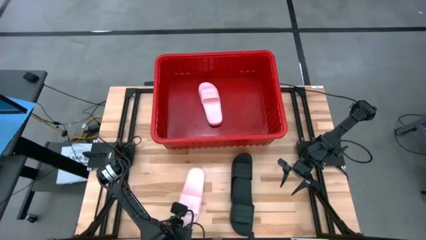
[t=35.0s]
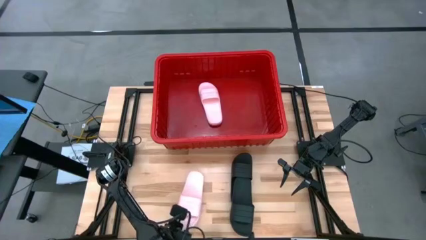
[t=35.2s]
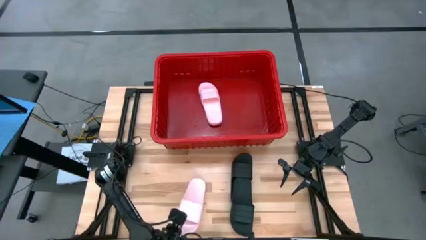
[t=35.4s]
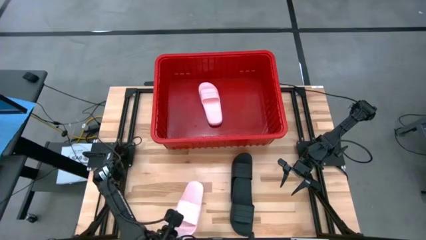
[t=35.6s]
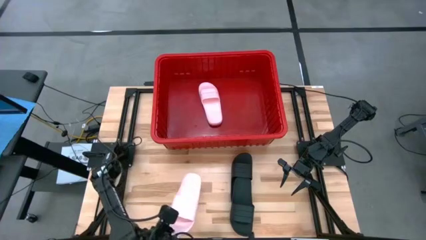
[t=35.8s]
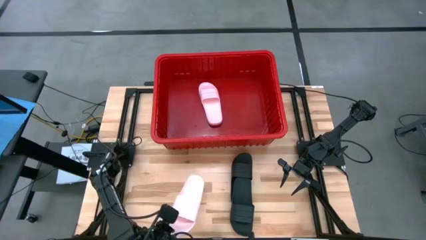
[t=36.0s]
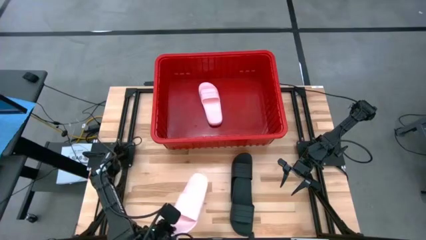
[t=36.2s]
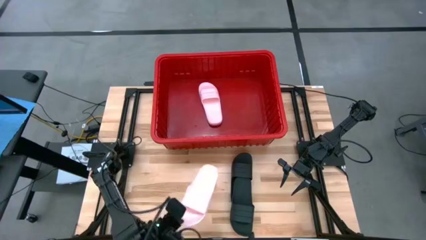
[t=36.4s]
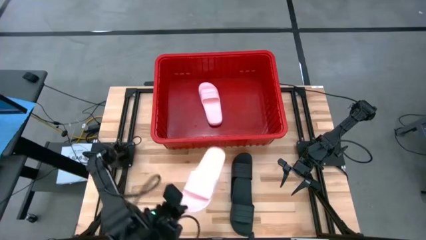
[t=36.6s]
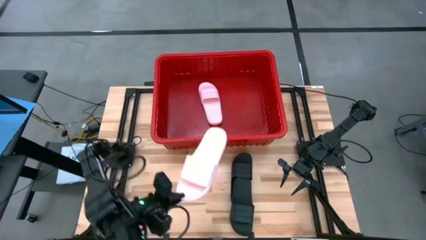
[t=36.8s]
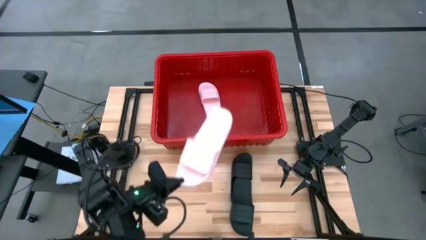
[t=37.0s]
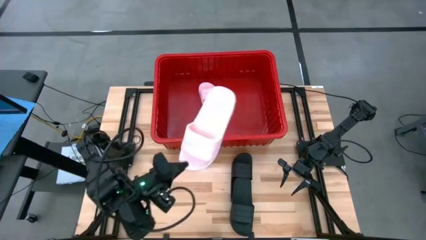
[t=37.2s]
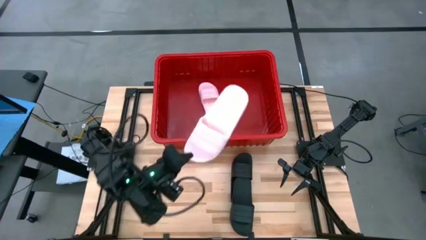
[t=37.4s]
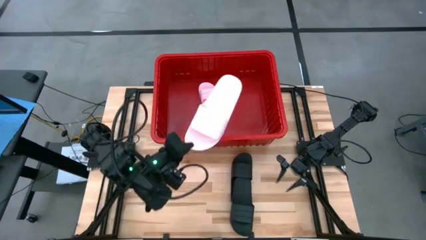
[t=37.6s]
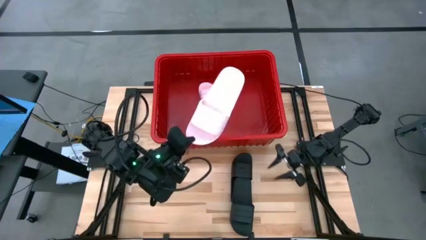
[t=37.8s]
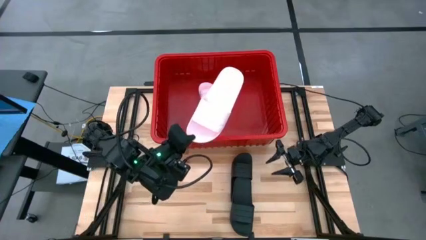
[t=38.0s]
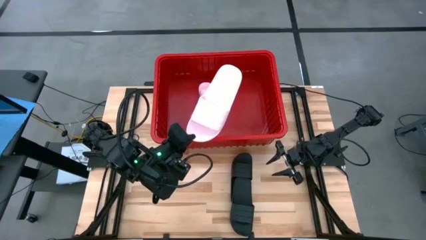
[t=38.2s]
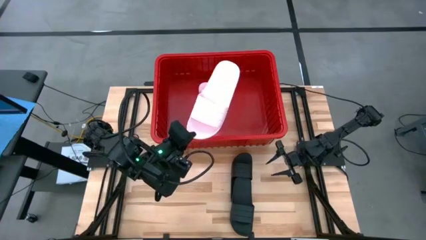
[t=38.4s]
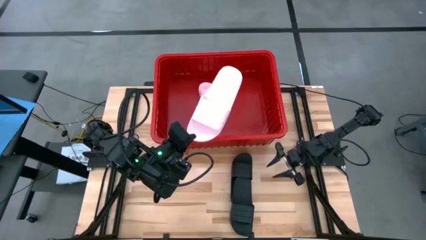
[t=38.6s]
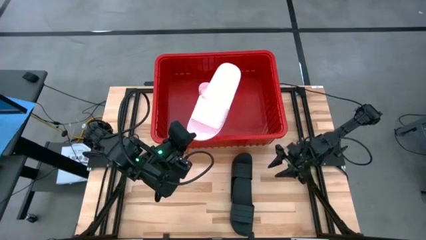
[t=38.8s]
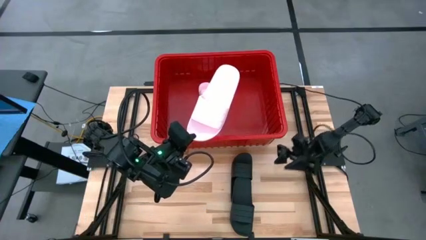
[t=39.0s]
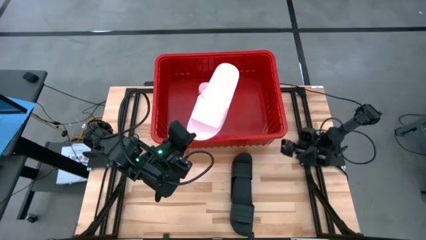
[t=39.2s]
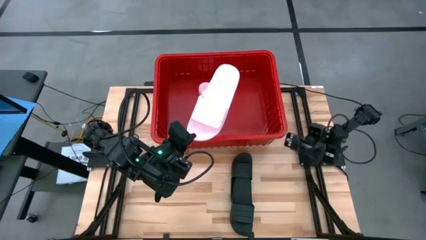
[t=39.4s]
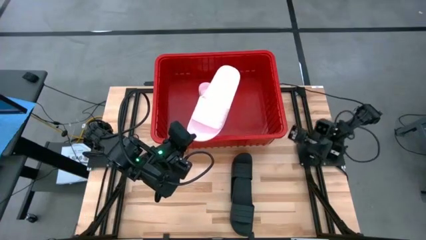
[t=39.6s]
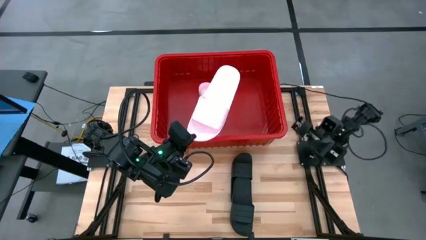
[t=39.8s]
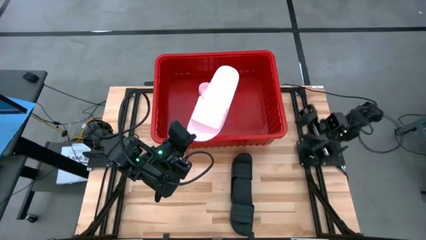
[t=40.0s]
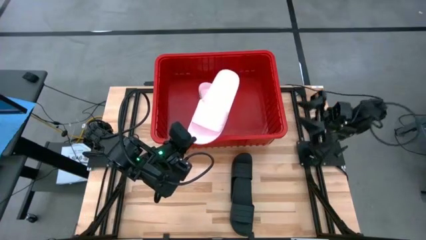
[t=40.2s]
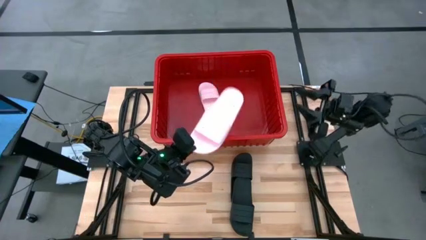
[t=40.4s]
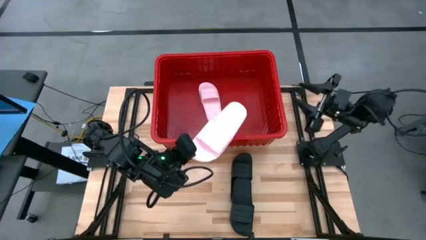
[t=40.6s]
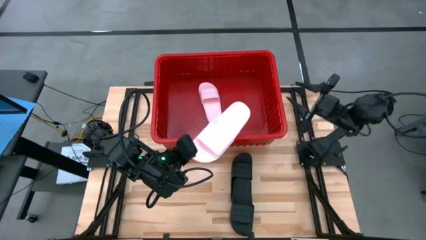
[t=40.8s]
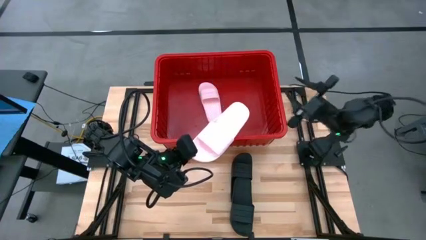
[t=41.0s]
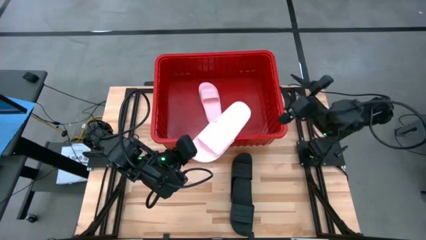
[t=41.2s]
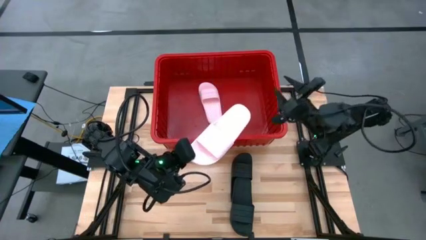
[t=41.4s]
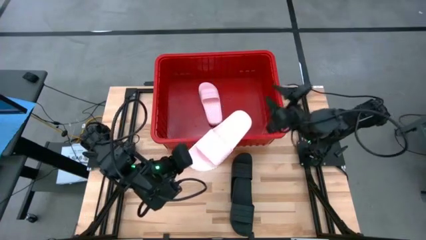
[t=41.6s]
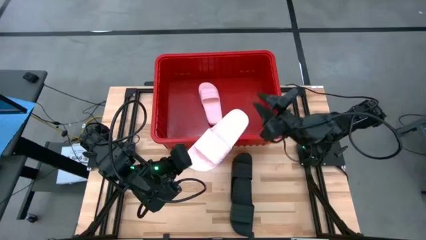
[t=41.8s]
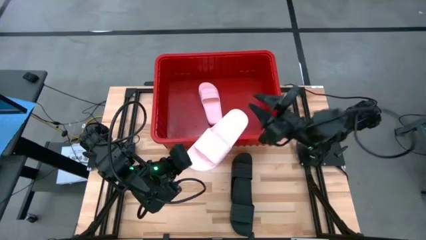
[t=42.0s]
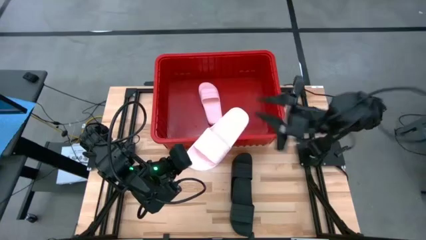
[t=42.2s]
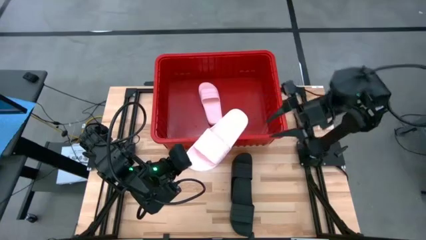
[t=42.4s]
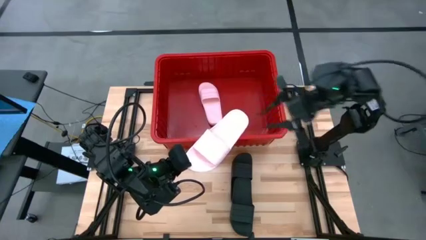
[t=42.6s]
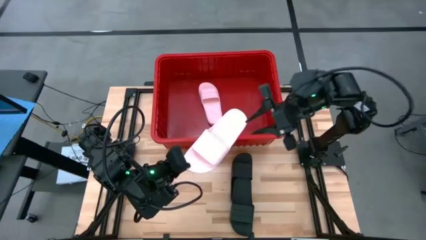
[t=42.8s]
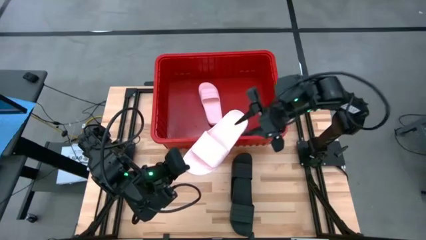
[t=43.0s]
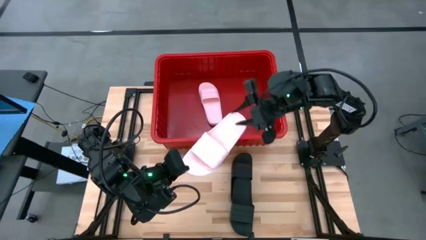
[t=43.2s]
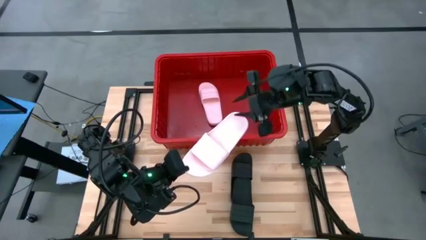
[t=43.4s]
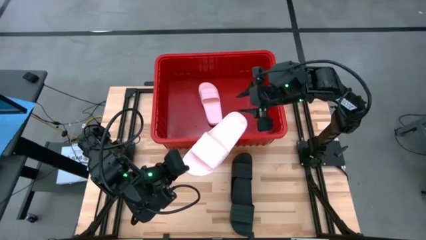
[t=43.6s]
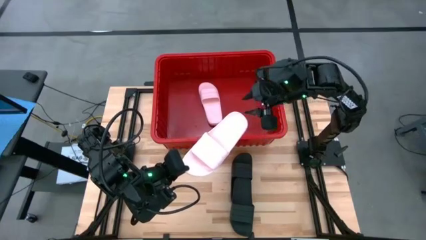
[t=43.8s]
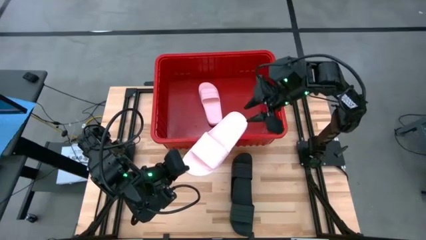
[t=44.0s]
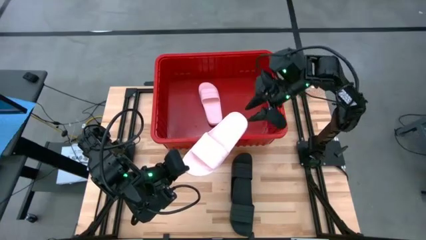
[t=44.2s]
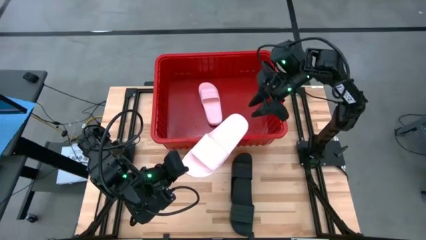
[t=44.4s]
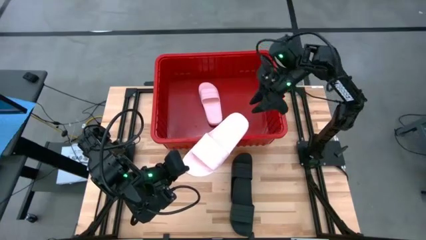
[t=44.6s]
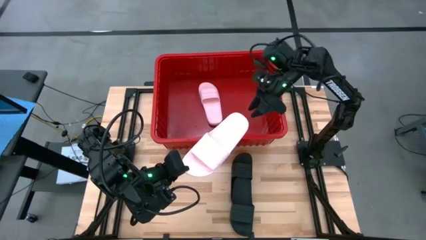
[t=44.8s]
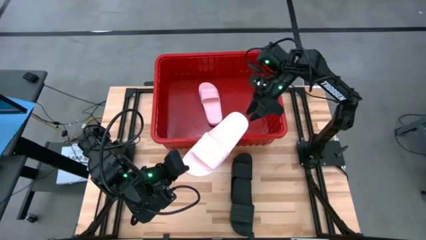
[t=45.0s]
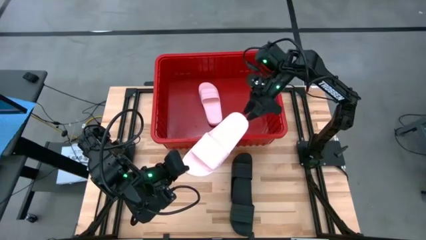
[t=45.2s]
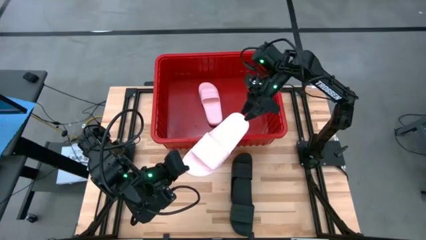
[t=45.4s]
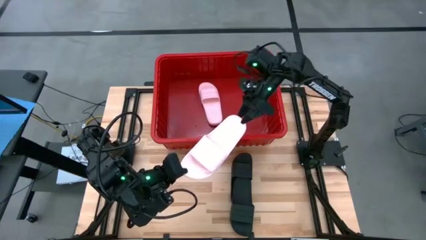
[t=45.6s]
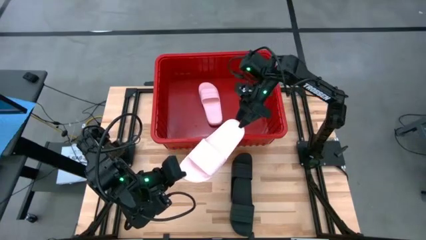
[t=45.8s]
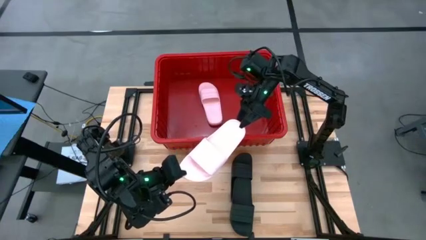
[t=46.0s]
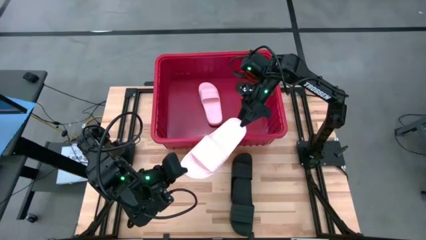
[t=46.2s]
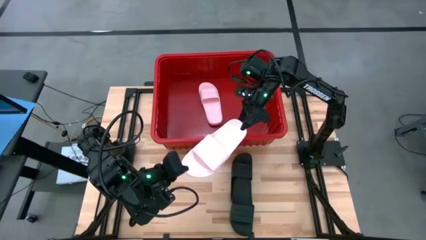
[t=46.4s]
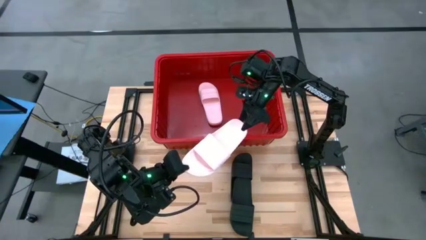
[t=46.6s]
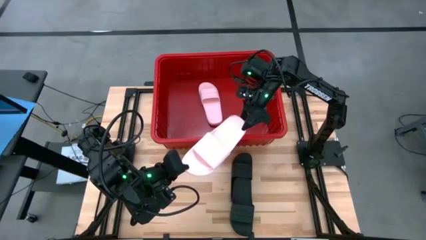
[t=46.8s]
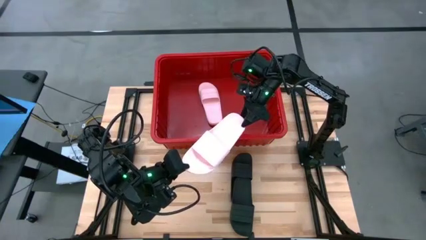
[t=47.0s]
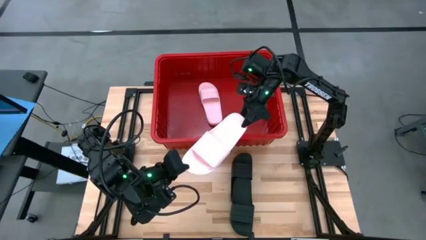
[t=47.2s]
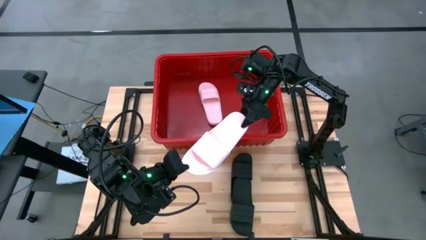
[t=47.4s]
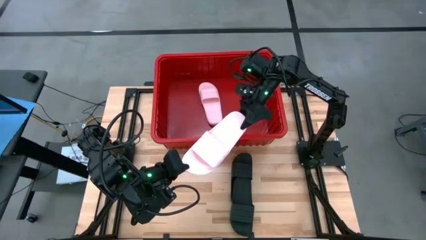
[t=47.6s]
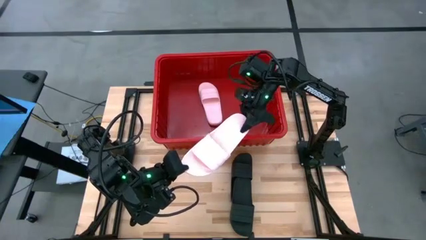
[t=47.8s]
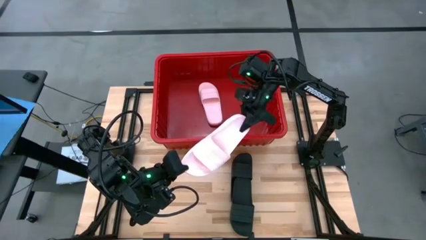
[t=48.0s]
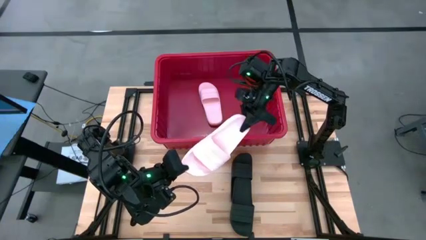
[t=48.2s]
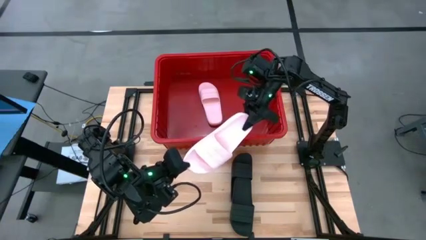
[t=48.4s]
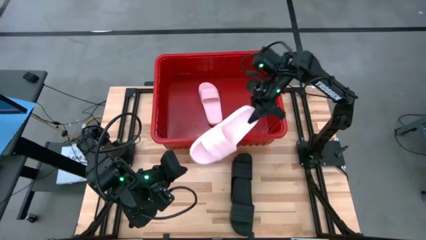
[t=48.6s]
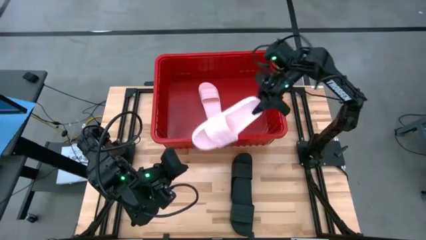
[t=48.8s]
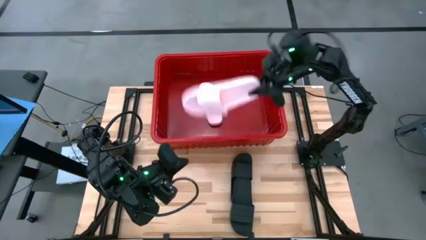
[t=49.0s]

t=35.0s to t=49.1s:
Task: Pick and place slides into bin
Put the pink slipper in the red bin

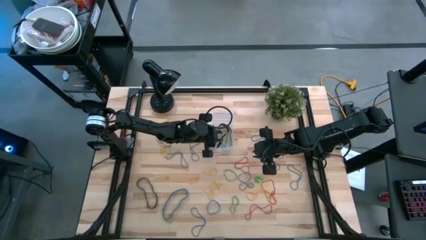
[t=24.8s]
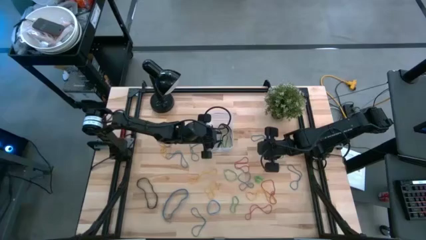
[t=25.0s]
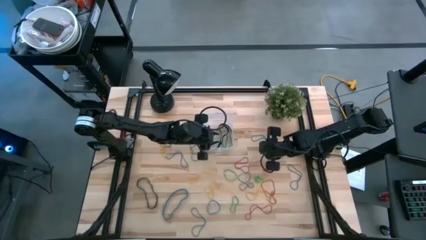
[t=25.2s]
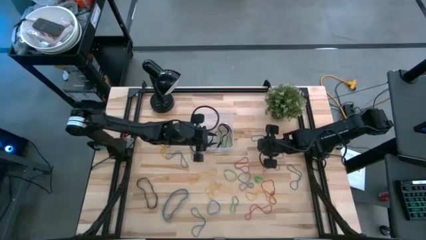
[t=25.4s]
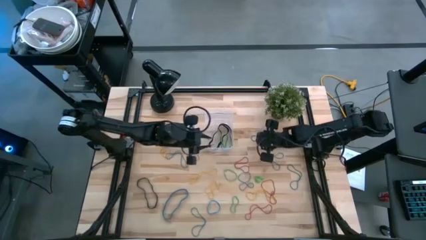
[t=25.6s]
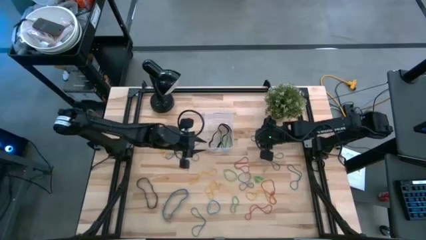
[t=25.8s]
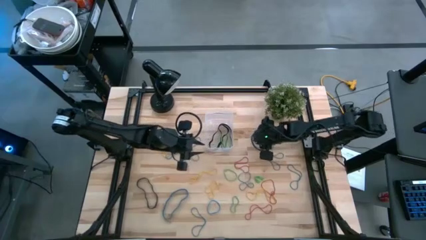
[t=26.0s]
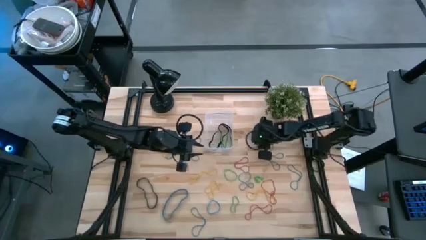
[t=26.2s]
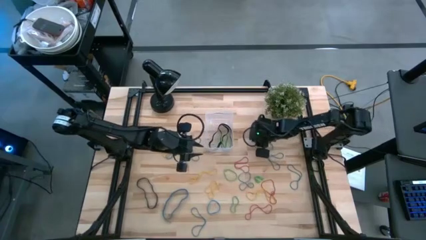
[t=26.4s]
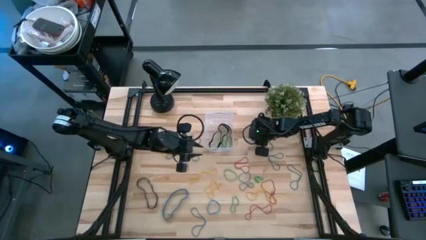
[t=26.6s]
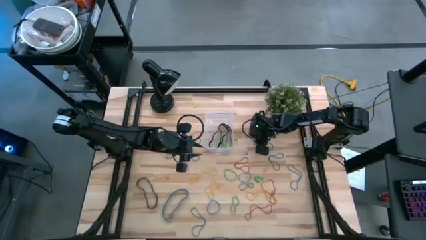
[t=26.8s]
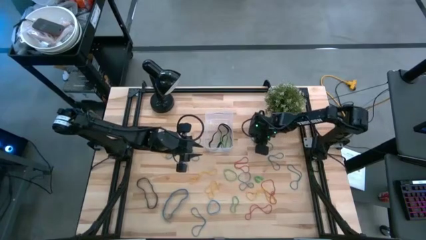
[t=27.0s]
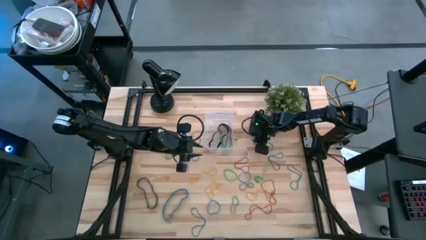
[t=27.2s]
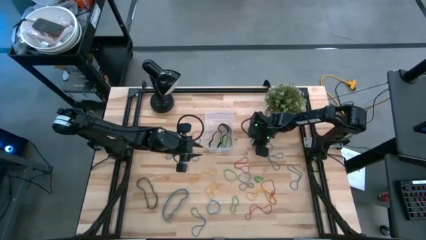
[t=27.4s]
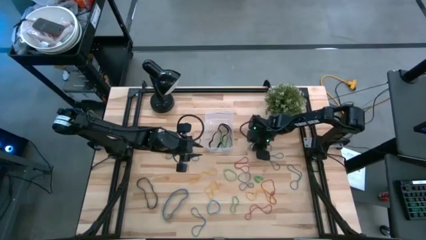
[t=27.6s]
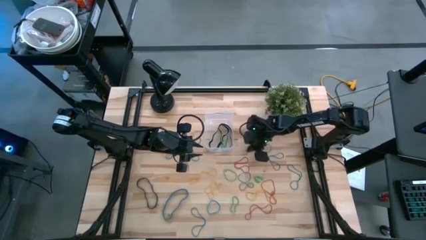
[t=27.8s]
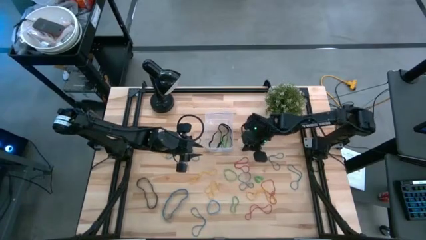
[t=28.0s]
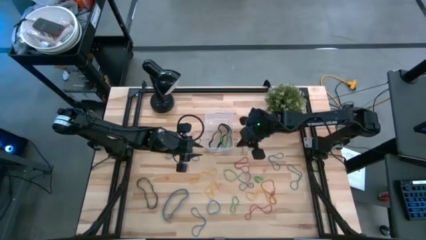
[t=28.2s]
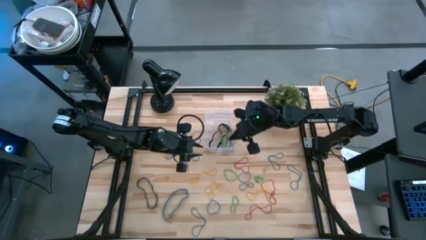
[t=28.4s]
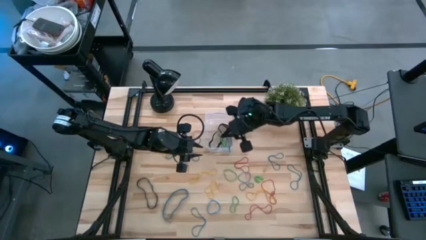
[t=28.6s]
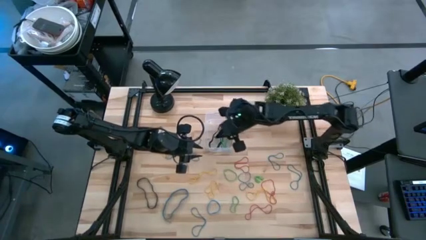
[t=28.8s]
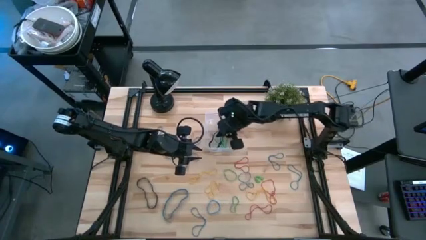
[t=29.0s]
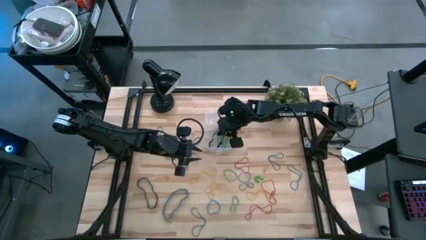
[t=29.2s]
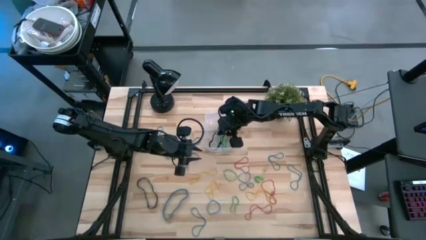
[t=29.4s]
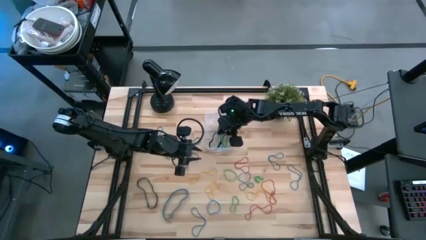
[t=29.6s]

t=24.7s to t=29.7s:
Task: Pick and place rubber bands into bin
Put blue rubberband into the transparent bin
